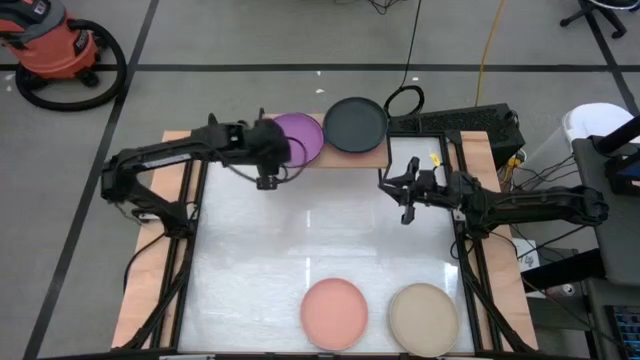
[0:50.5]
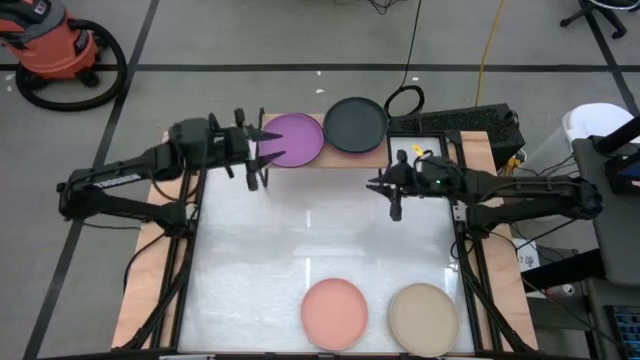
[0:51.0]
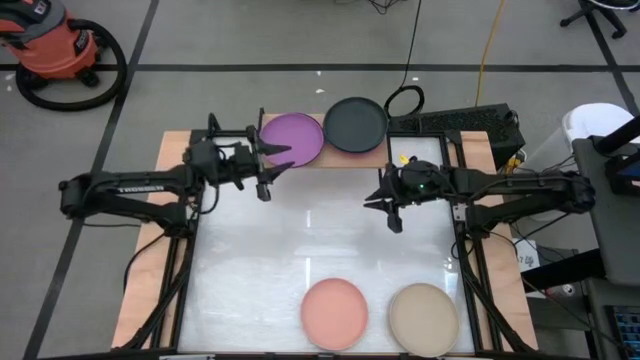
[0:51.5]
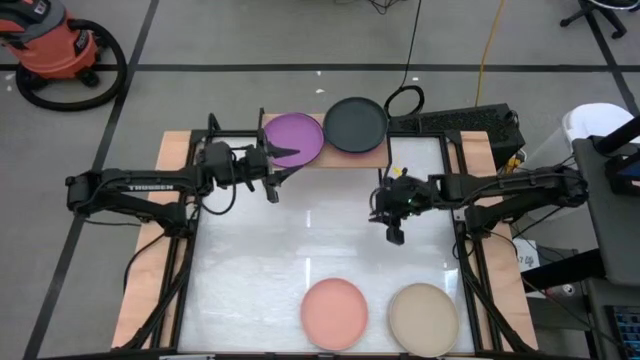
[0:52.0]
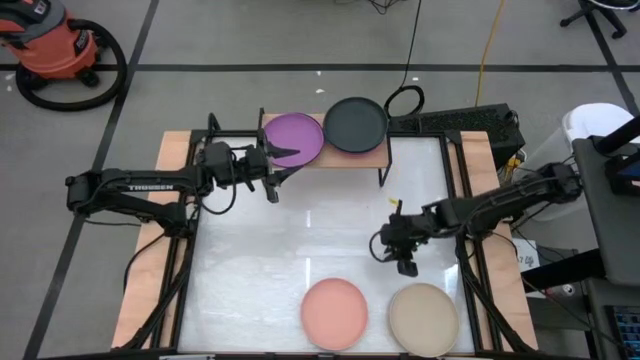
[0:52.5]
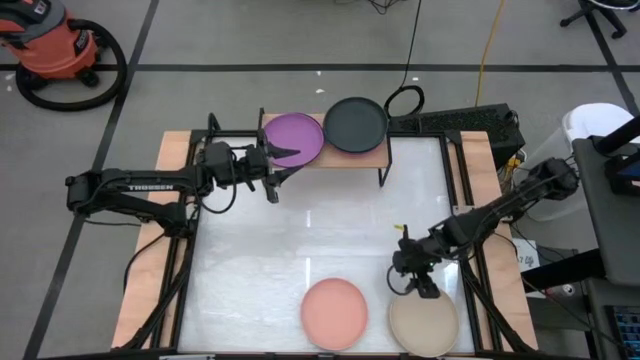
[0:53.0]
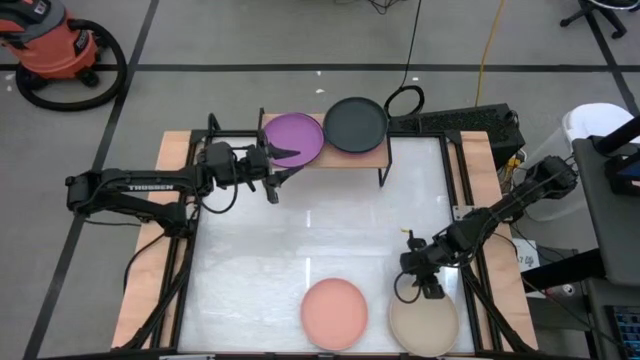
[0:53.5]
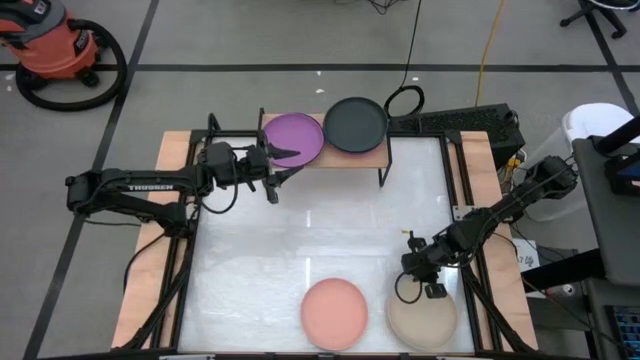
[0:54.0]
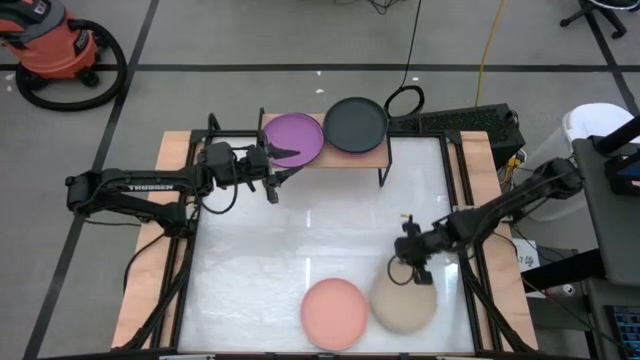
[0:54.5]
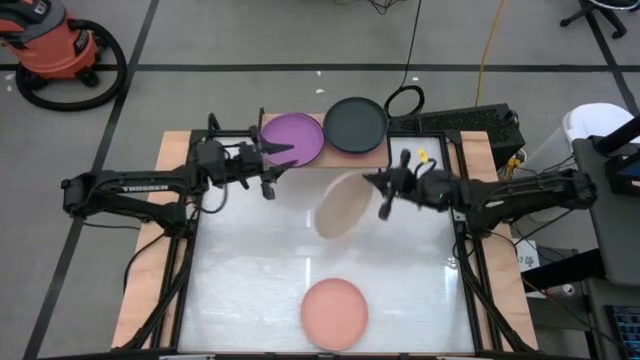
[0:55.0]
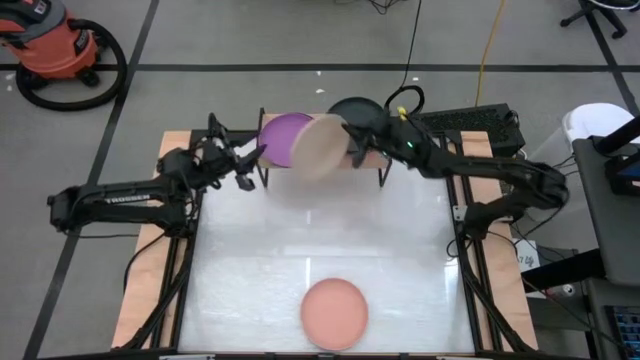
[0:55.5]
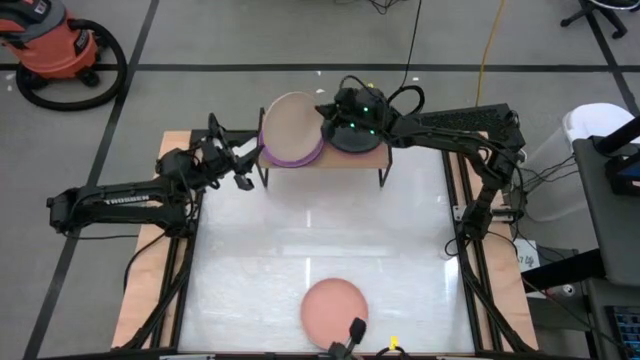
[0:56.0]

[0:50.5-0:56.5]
Task: Place and stack plates onto a shelf
Stack the brown plate on top of the purple plate on the shelf

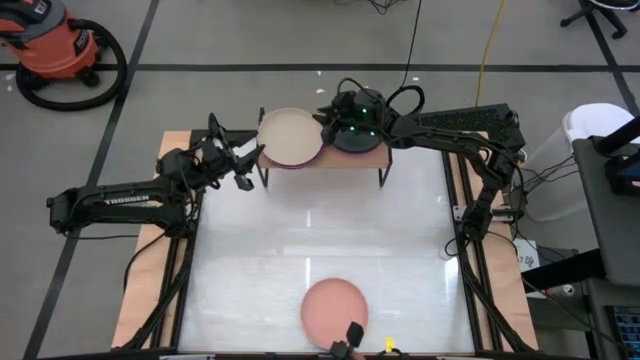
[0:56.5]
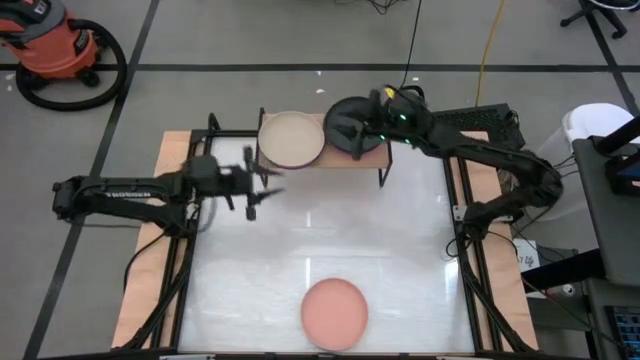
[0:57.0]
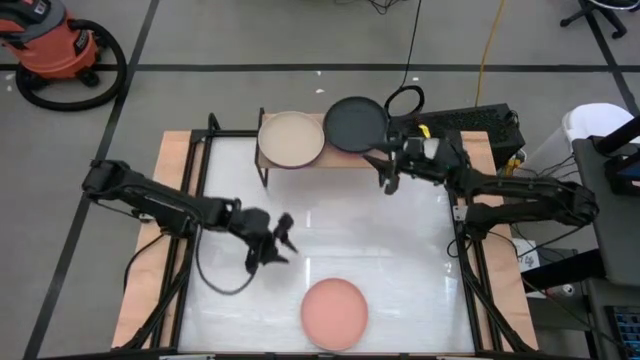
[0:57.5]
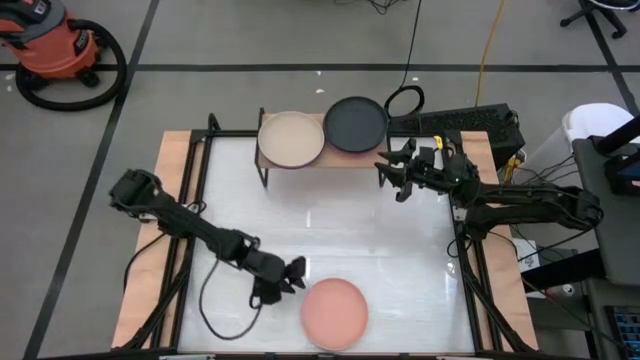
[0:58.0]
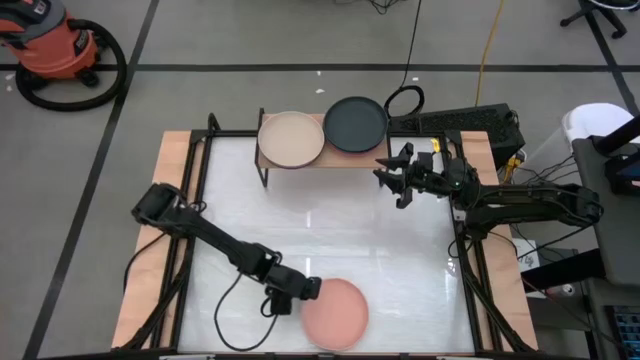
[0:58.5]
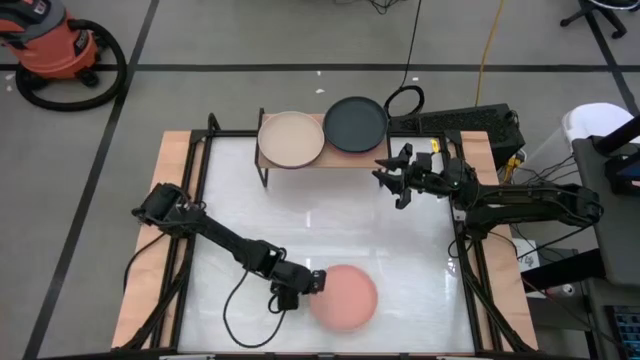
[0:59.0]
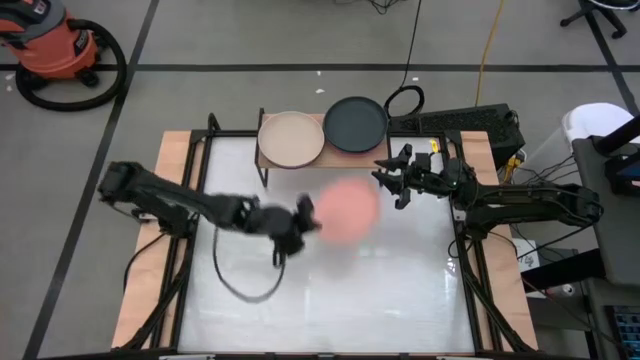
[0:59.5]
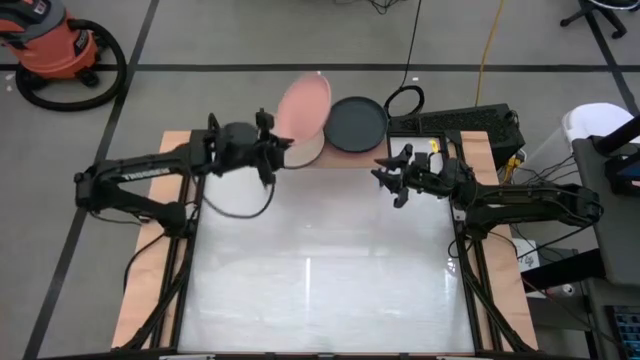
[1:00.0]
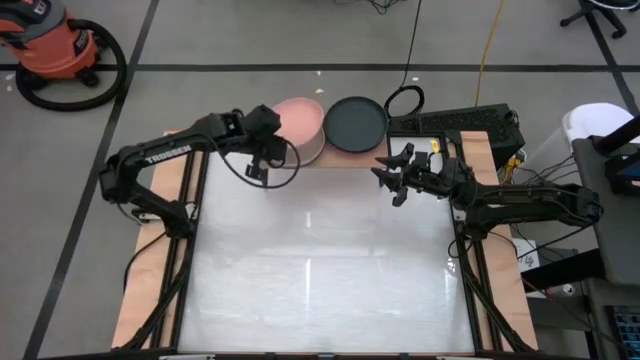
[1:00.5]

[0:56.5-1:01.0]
Stack the light orange plate on top of the brown plate on the shelf

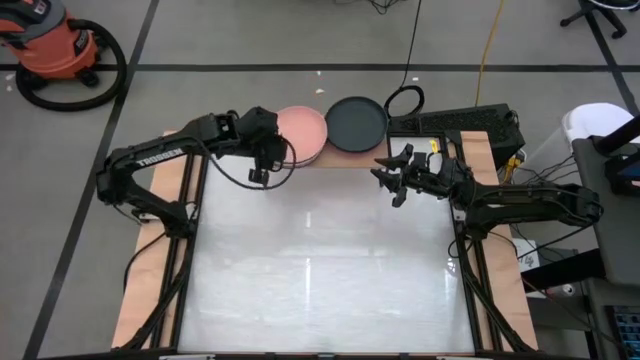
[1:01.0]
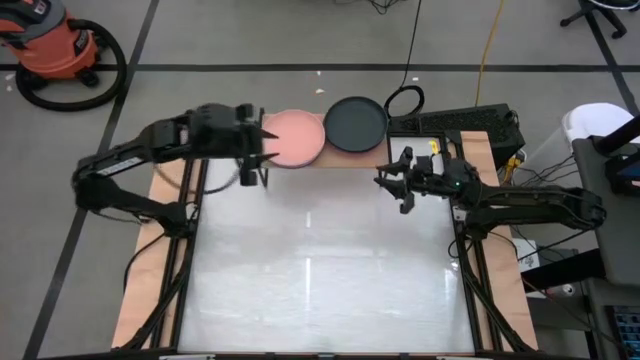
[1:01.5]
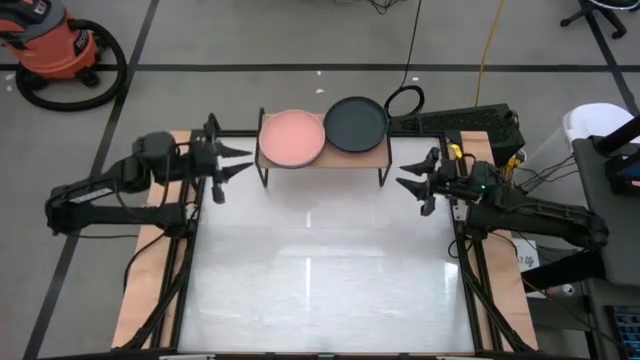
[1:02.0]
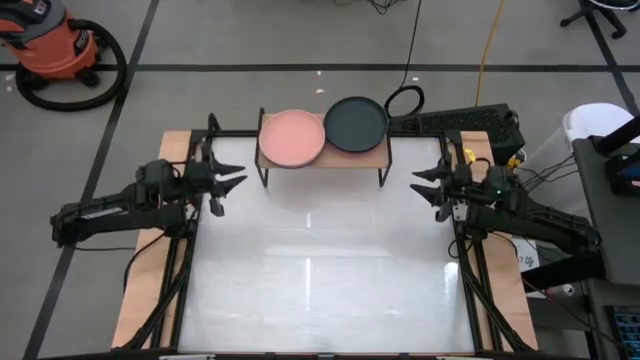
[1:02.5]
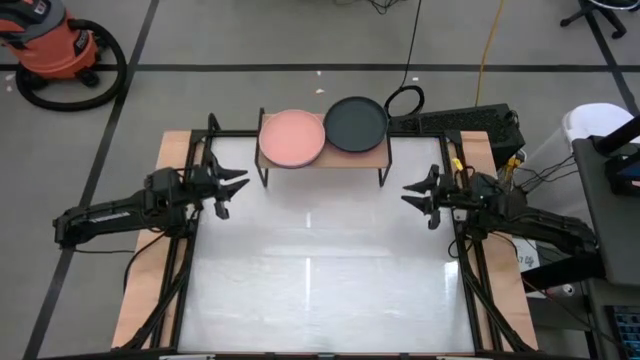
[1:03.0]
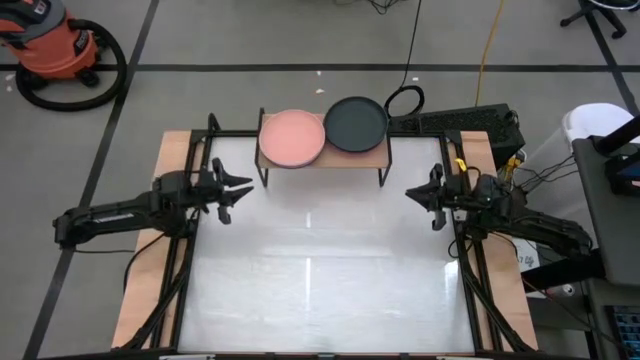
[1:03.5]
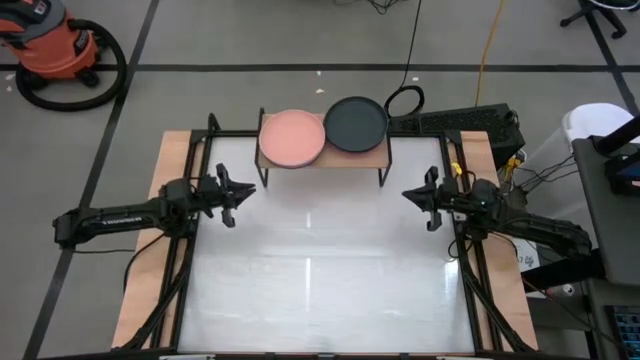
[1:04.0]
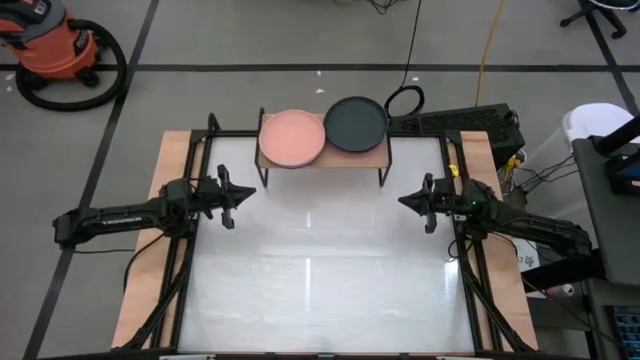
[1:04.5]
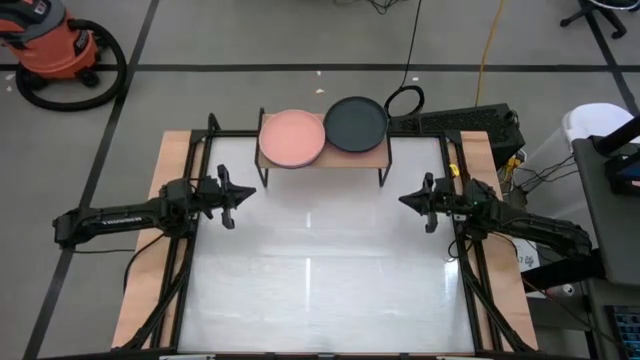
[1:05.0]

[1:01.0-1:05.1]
Return to Home Position

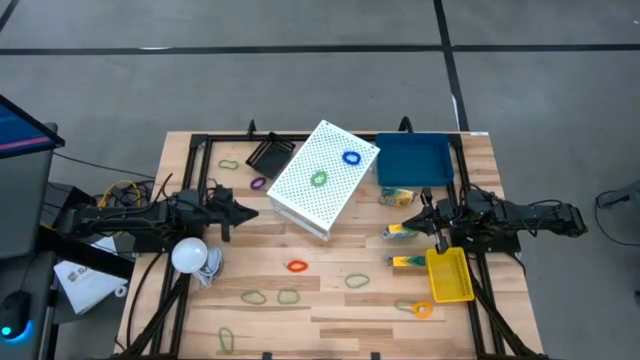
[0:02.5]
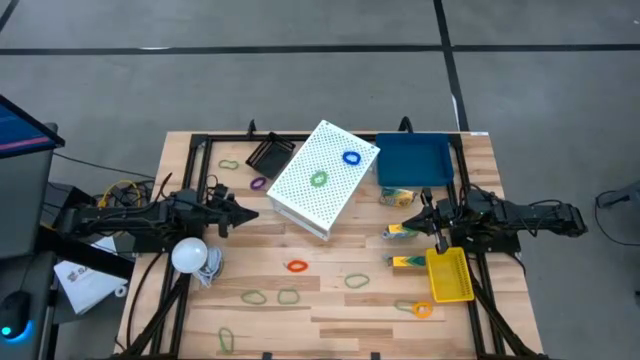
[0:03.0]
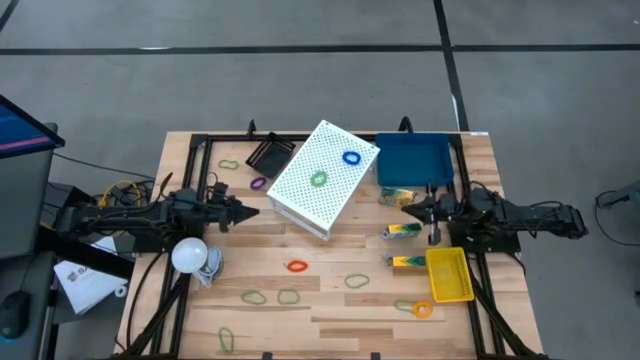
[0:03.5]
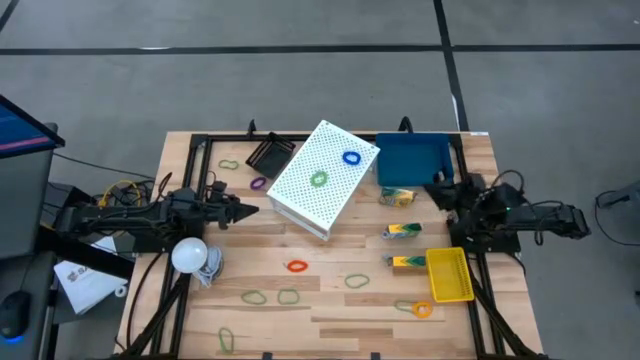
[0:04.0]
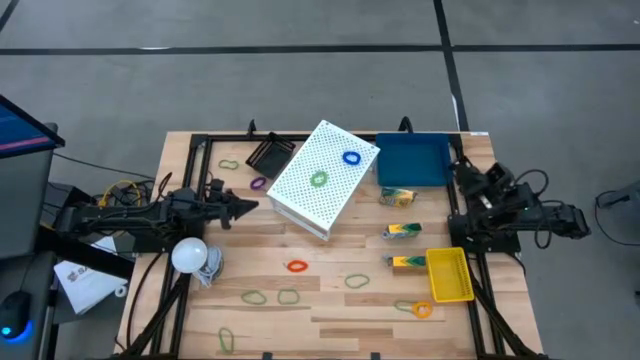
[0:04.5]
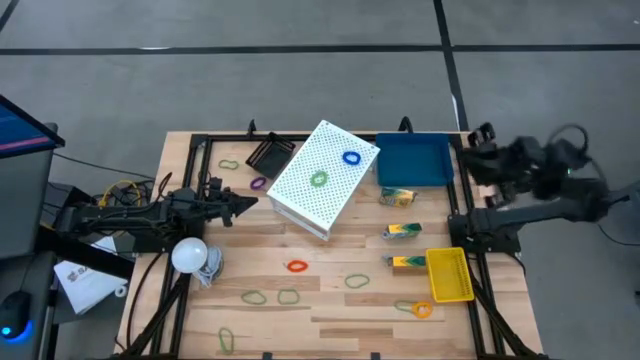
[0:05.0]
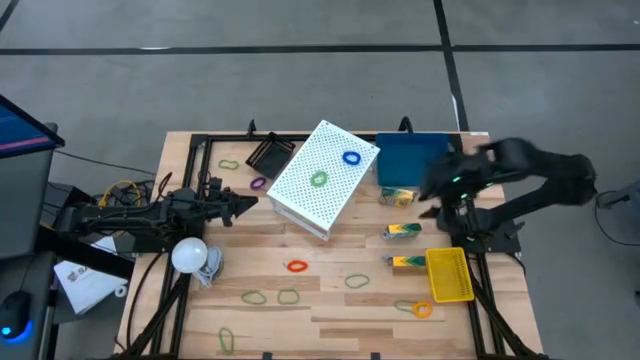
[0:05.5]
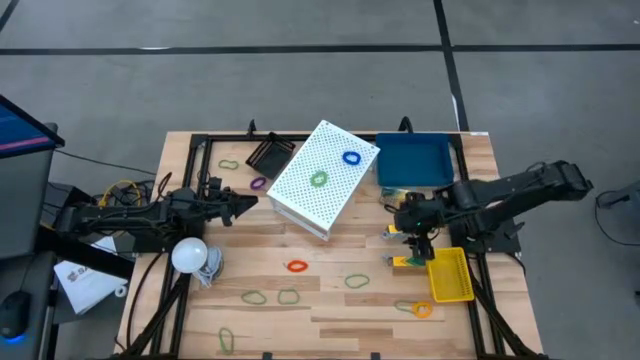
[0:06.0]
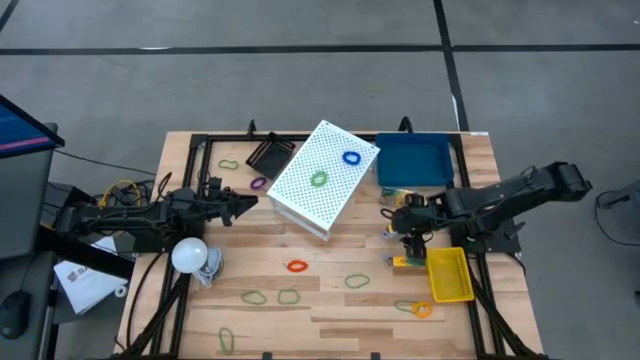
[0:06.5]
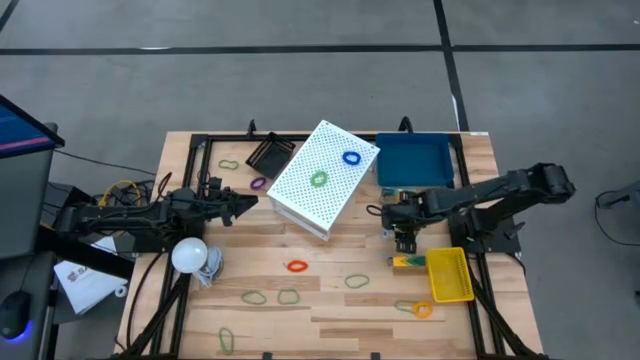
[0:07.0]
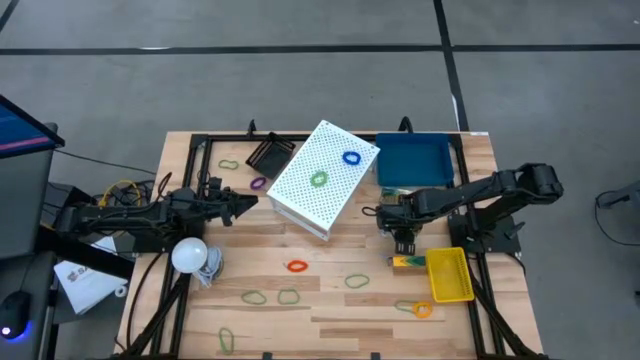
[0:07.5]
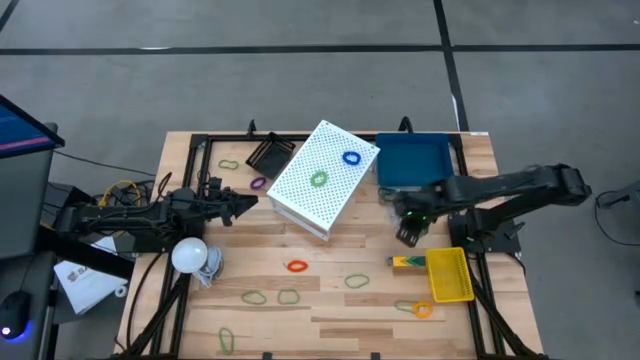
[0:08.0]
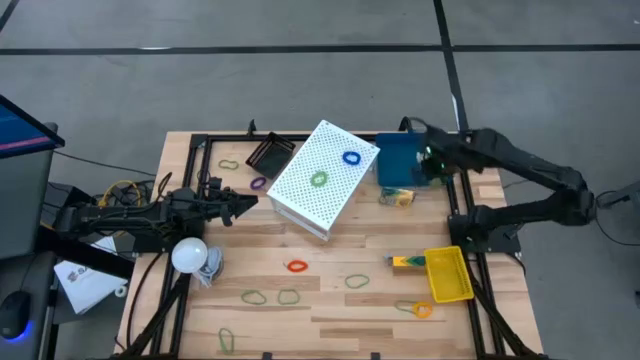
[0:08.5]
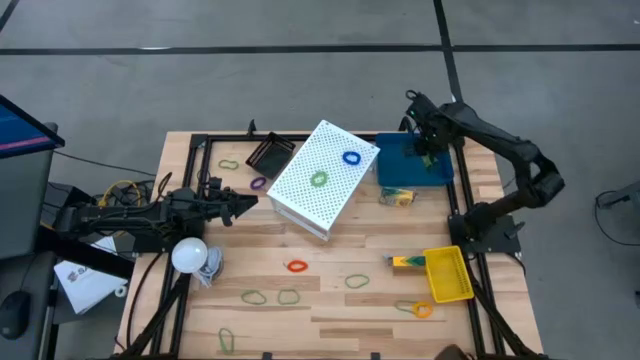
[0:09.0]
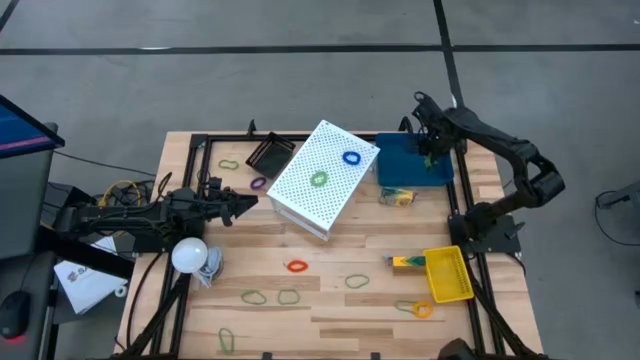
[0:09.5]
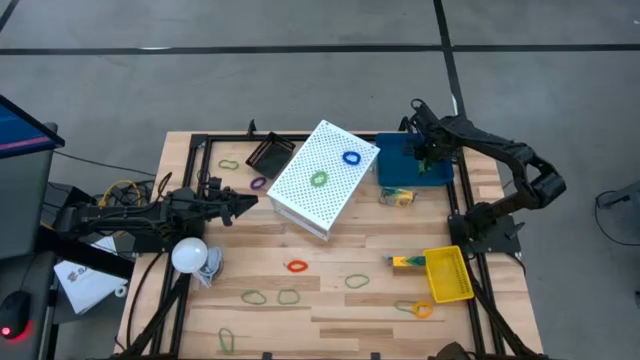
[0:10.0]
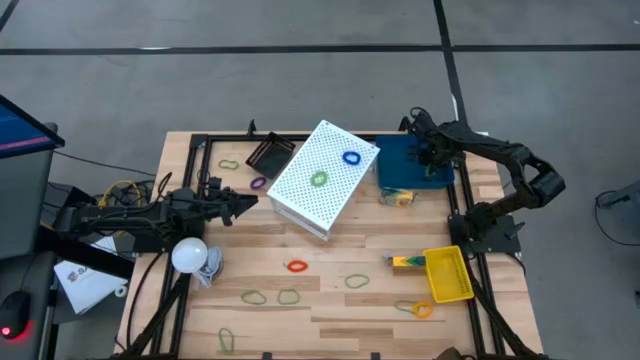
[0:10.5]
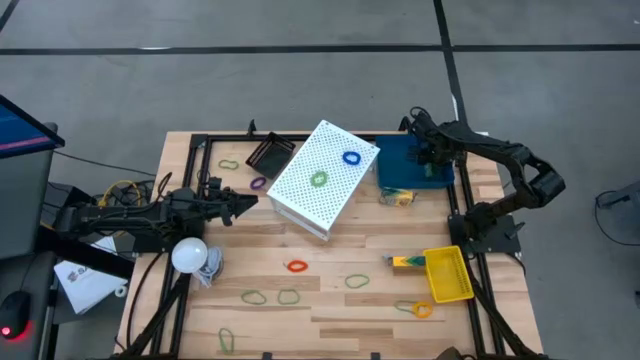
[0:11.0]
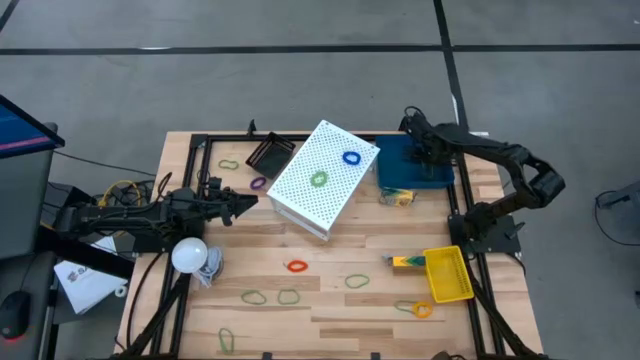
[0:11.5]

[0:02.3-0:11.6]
Task: Pick & Place Office Desk Supplies
Put the yellow box of crayon into the blue bin
